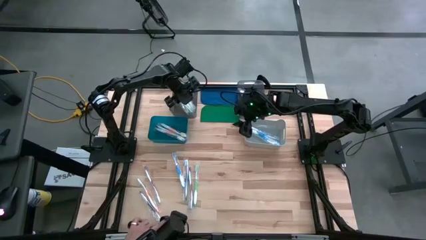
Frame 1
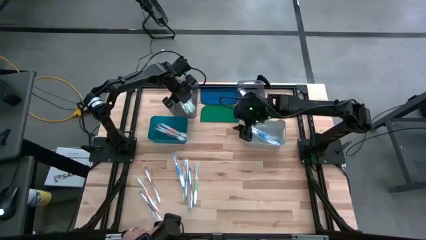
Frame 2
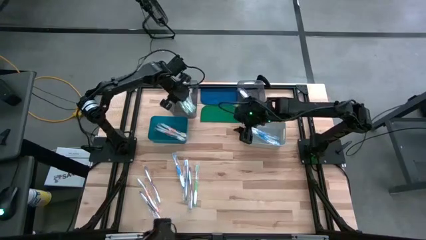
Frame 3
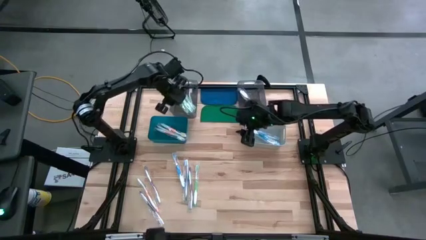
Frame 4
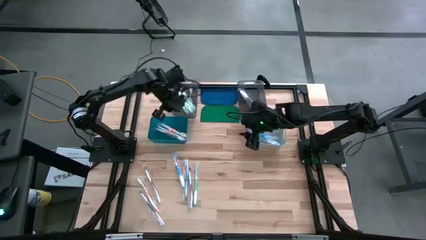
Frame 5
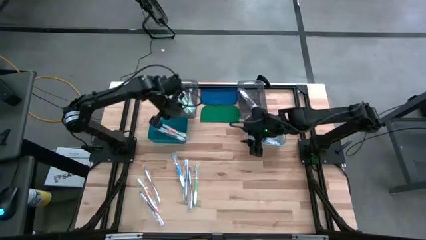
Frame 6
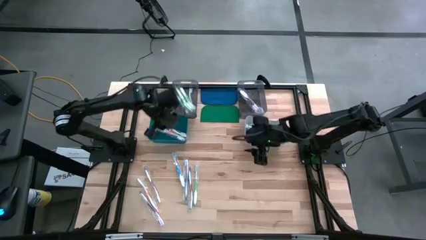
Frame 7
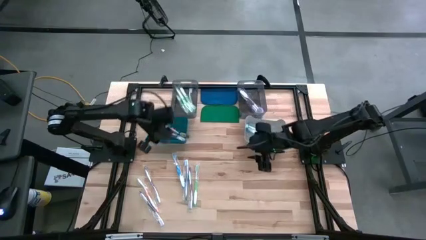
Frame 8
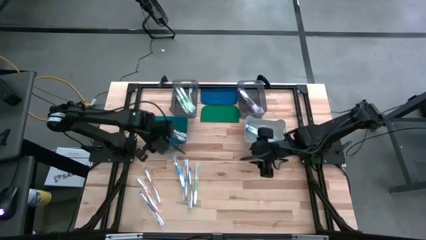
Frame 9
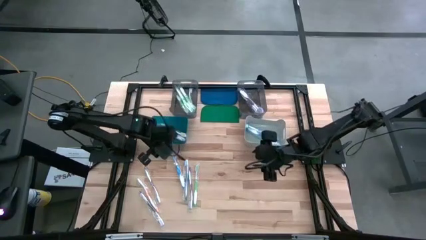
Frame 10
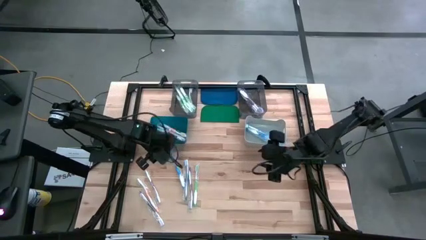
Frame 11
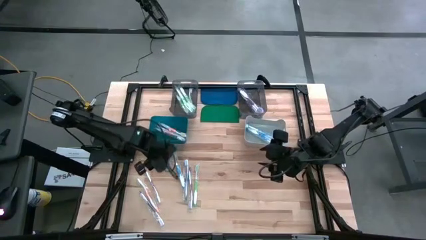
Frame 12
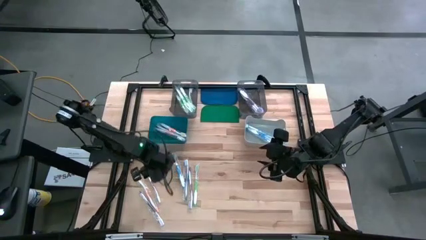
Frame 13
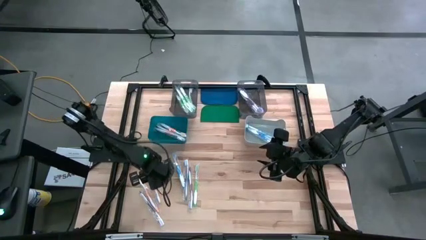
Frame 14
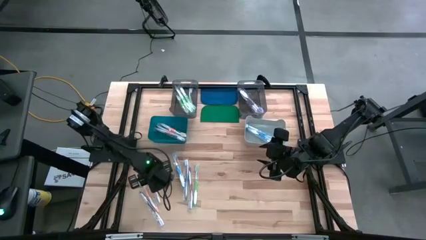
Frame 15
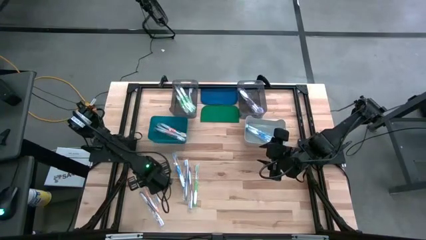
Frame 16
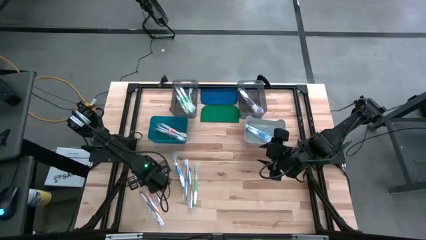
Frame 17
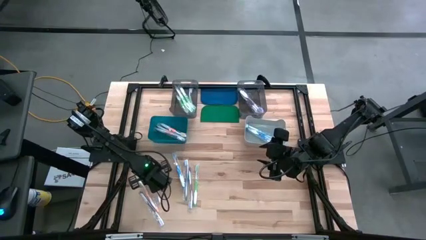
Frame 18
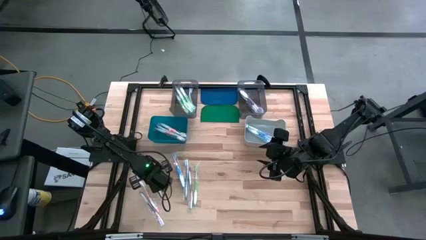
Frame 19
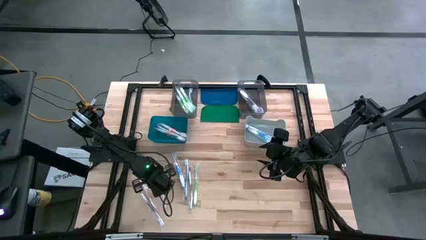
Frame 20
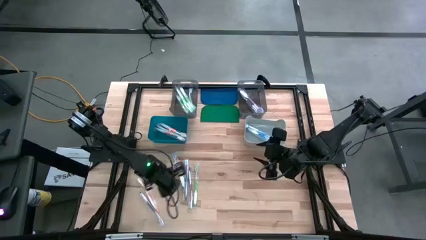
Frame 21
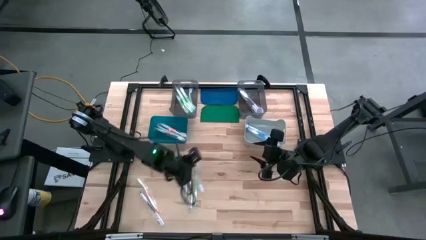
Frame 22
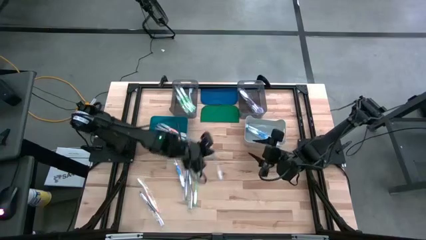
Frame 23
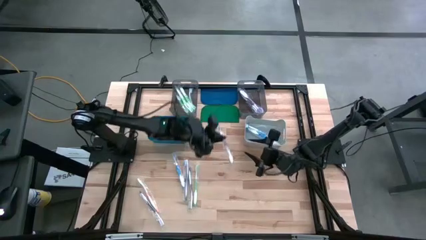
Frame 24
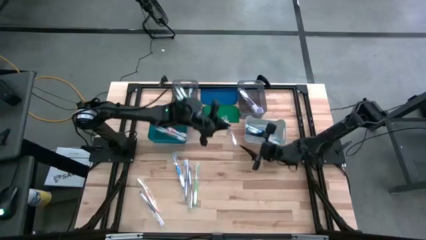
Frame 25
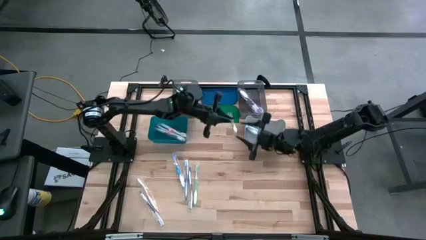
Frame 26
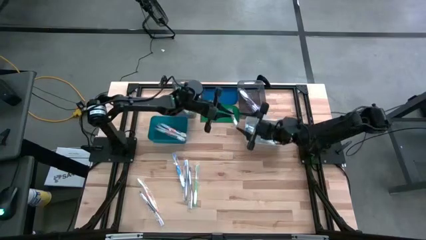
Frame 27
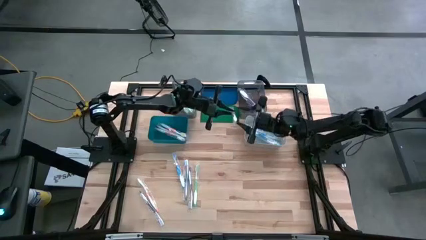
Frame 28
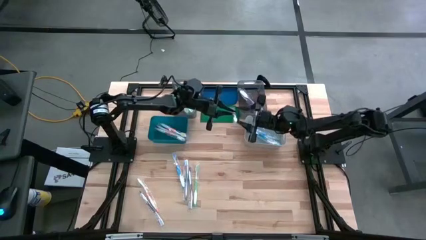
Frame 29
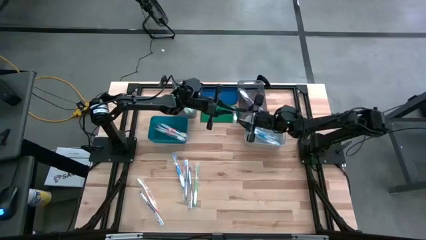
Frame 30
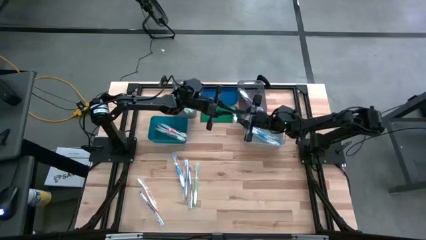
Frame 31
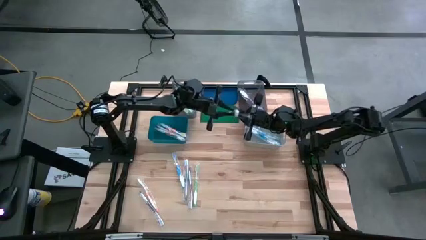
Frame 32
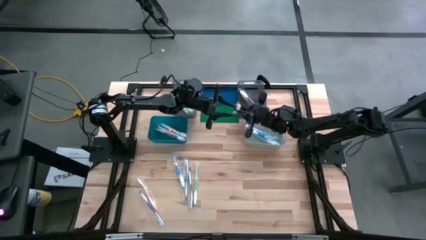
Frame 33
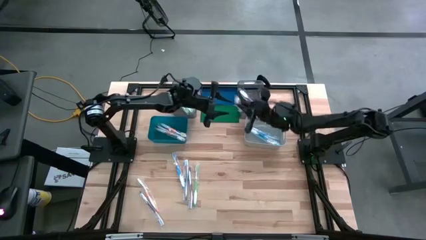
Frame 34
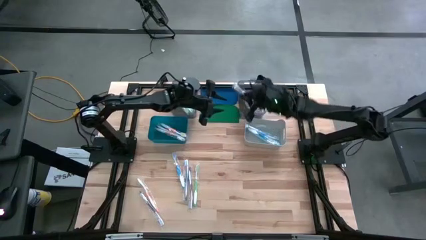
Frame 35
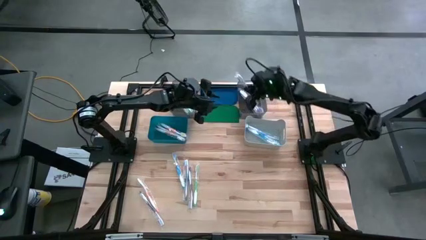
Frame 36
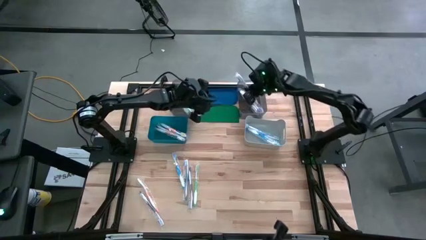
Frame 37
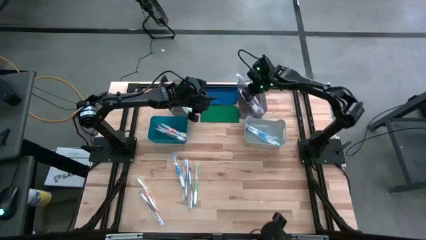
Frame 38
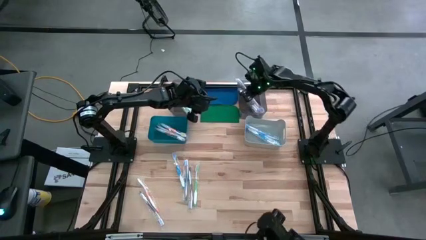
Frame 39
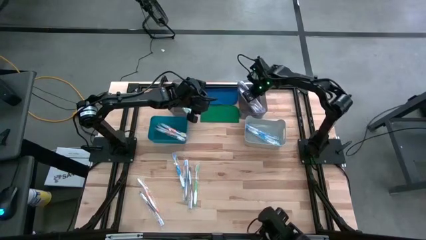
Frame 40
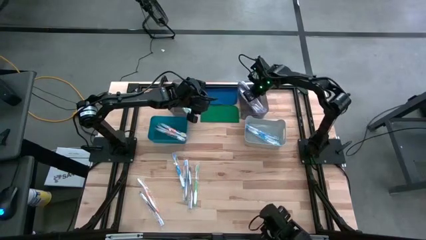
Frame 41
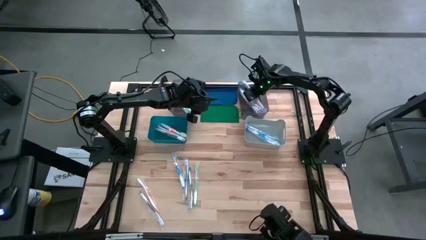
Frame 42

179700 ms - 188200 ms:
Task: Pick & Place Toothbrushes
Put the violet toothbrush into the right black bin

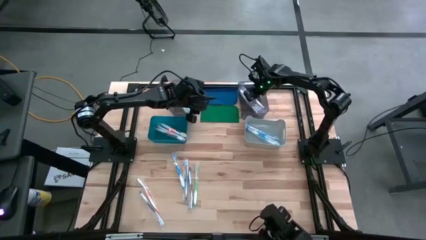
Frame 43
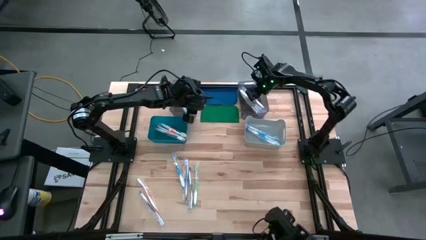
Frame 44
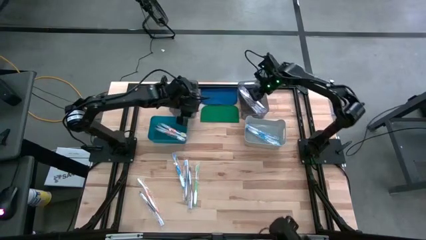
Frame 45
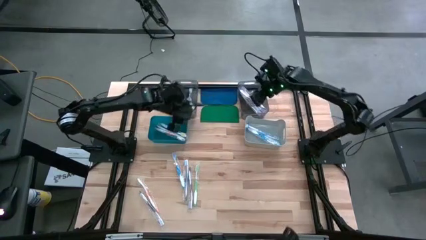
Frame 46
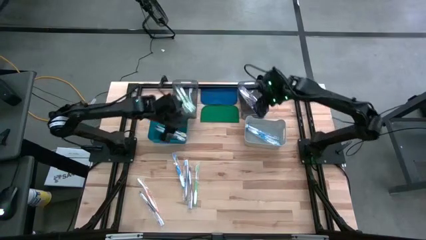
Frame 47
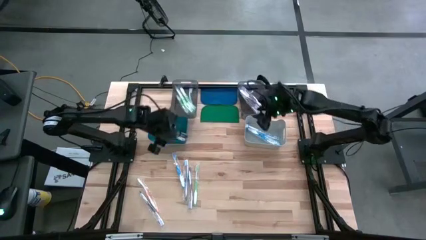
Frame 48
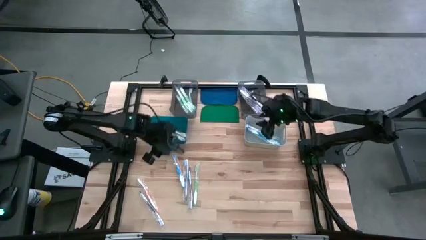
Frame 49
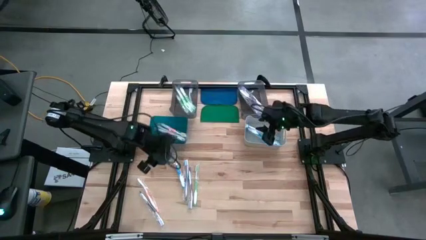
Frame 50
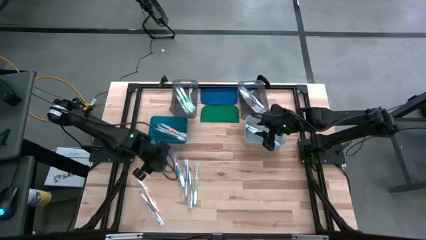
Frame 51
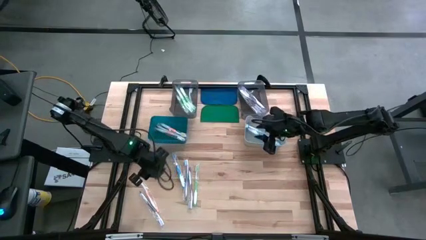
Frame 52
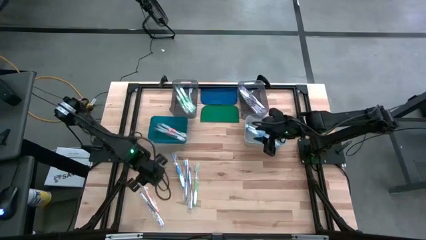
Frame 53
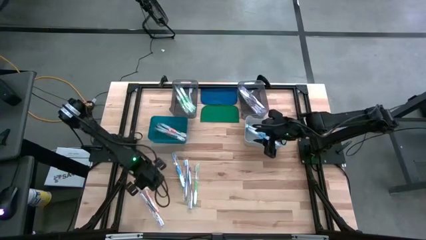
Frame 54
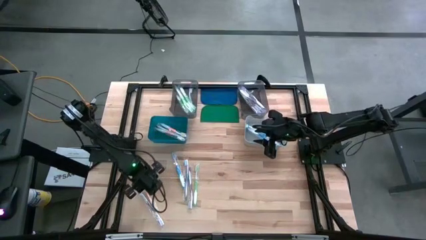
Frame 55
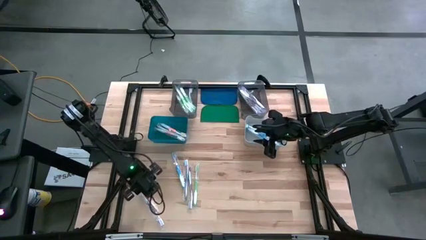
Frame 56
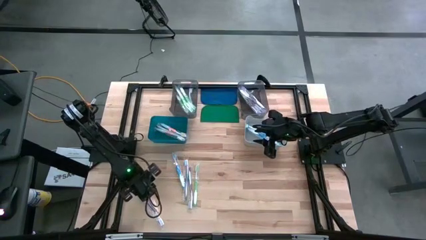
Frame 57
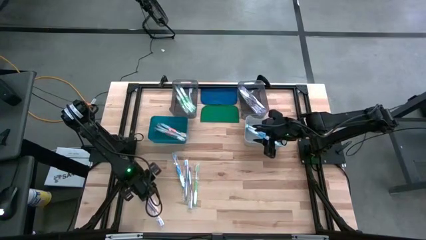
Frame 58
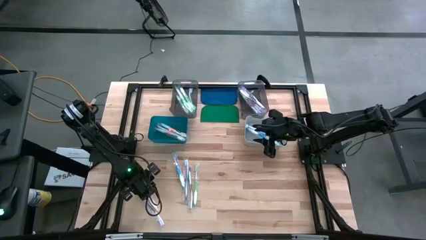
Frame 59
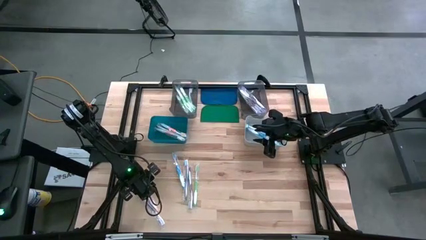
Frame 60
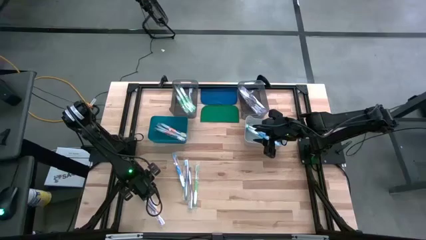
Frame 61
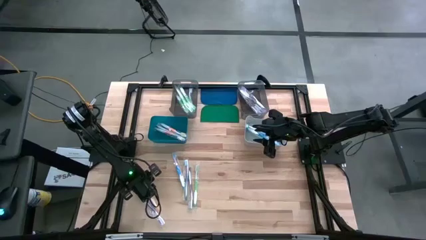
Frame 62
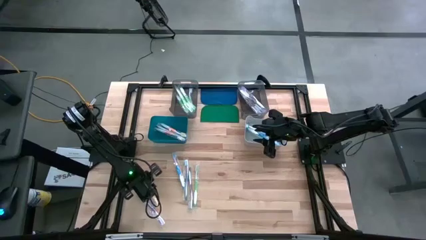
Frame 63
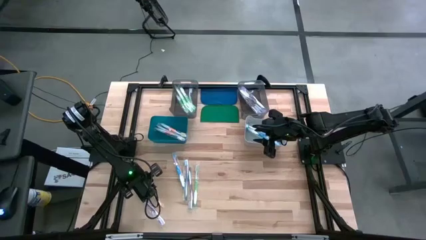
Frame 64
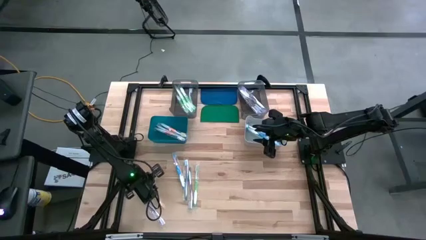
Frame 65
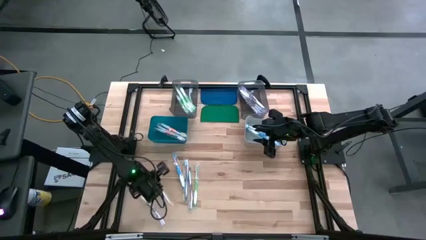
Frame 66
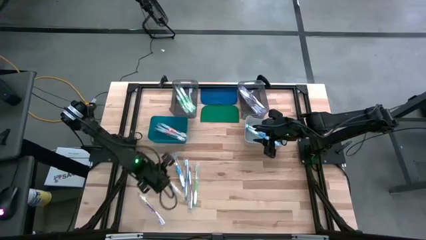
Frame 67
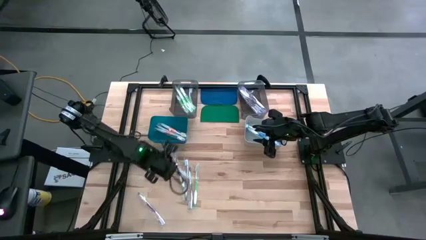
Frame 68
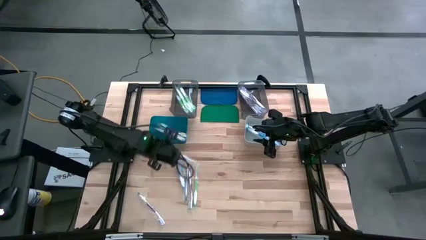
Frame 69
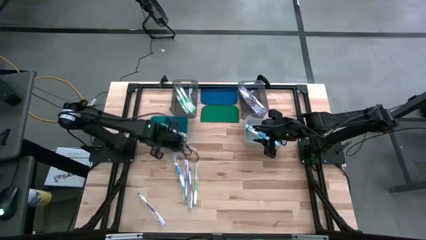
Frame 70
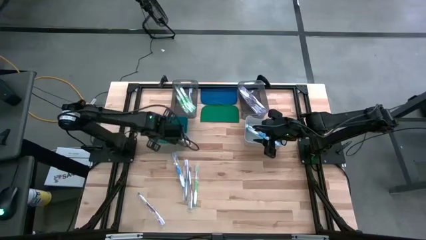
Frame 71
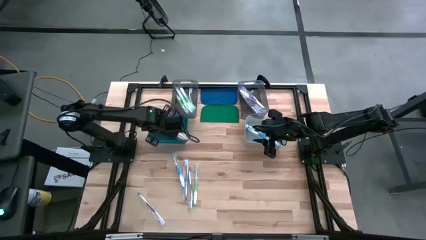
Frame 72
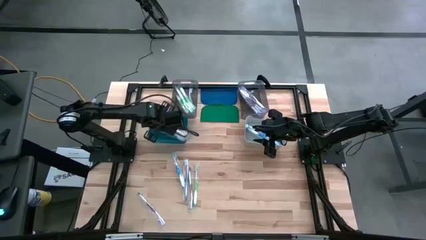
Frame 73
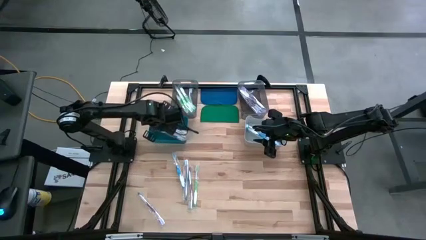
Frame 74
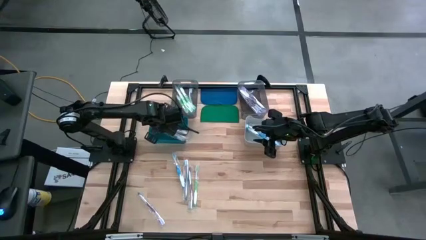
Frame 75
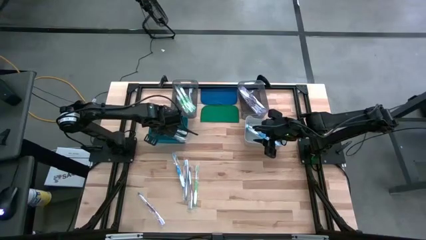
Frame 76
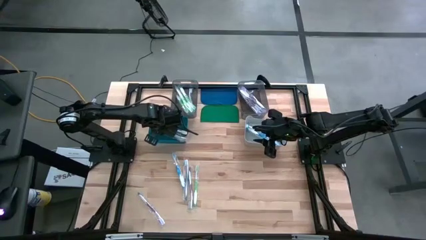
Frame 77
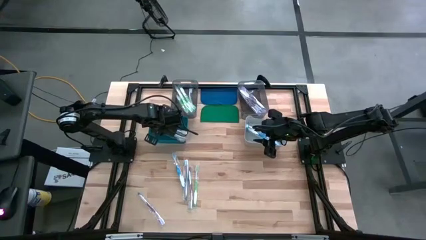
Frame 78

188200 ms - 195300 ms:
Put the orange toothbrush into the blue bin
